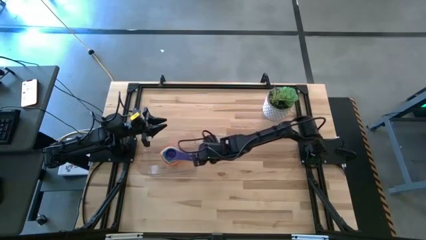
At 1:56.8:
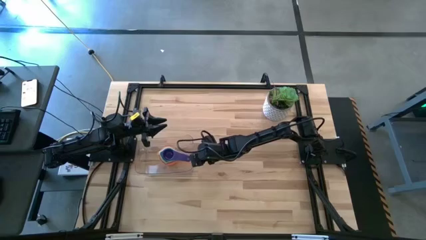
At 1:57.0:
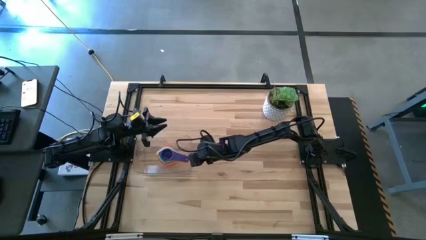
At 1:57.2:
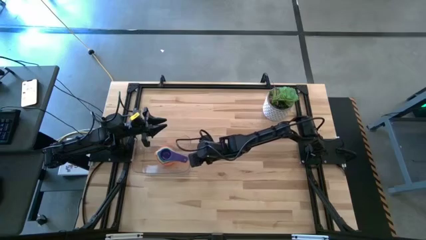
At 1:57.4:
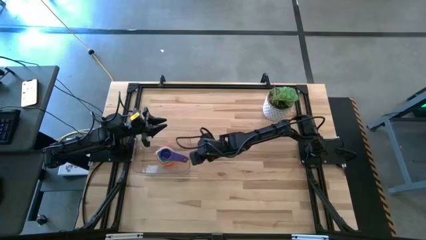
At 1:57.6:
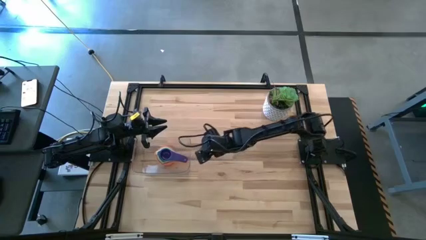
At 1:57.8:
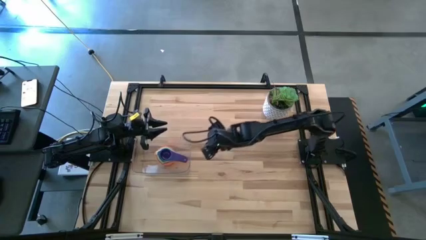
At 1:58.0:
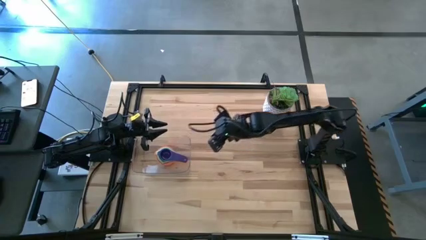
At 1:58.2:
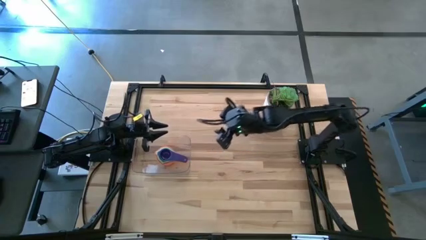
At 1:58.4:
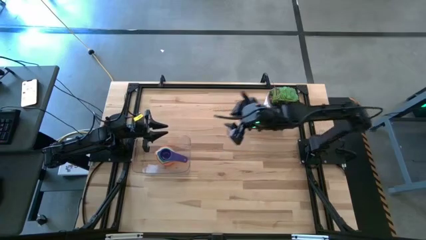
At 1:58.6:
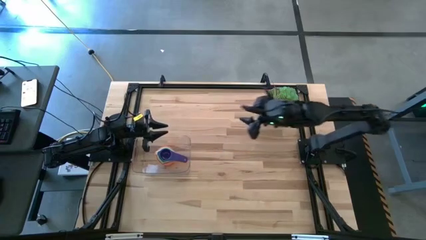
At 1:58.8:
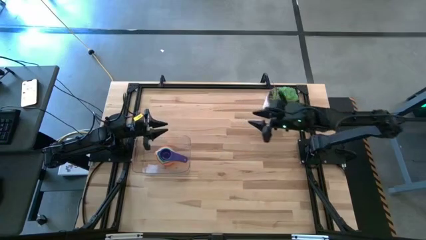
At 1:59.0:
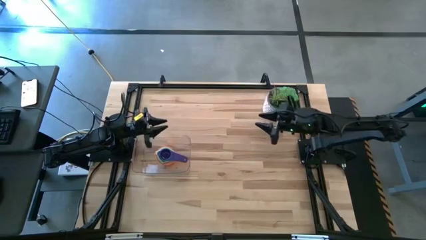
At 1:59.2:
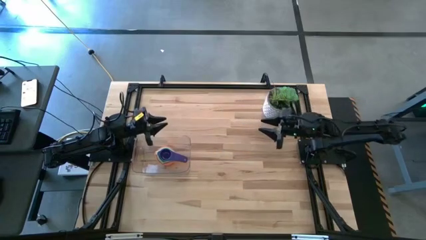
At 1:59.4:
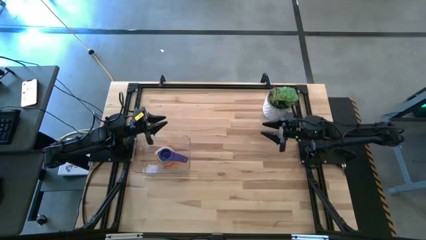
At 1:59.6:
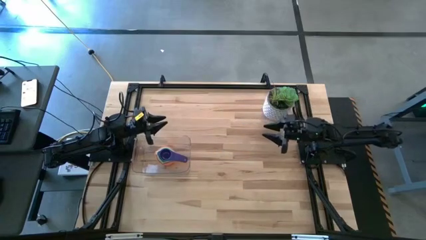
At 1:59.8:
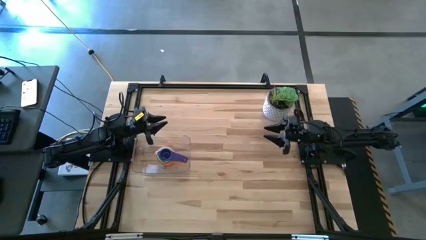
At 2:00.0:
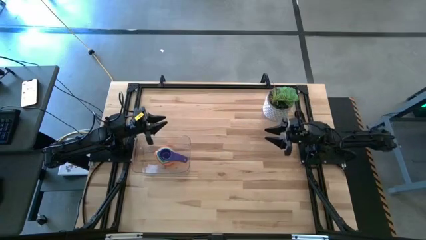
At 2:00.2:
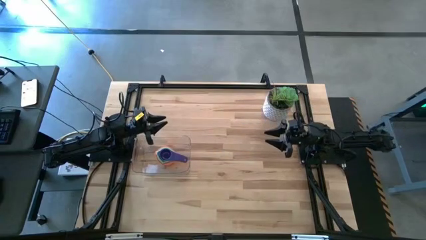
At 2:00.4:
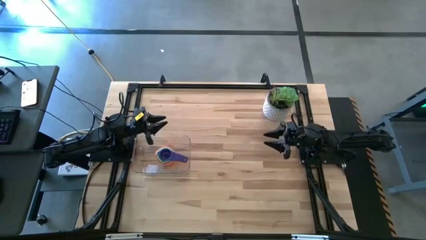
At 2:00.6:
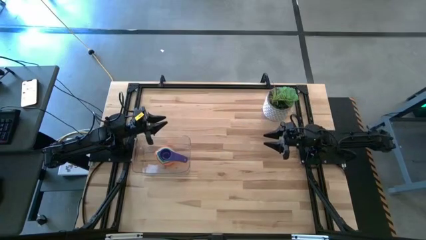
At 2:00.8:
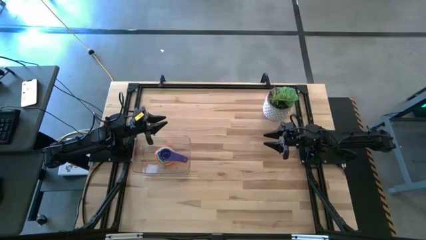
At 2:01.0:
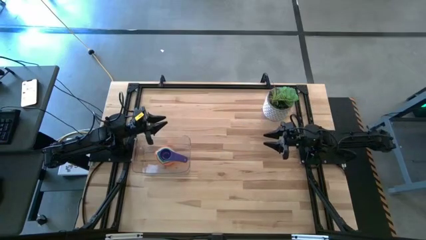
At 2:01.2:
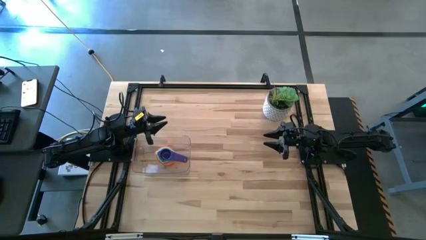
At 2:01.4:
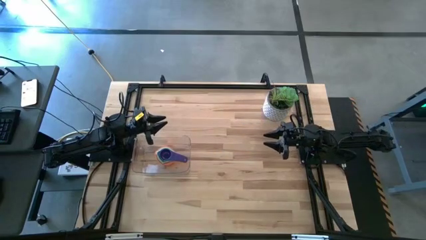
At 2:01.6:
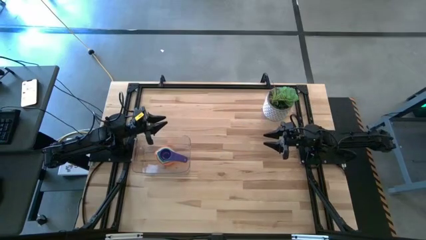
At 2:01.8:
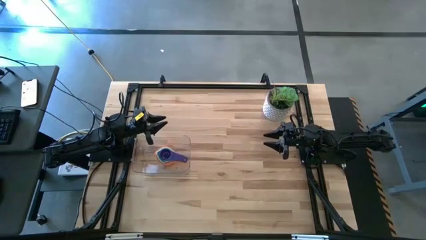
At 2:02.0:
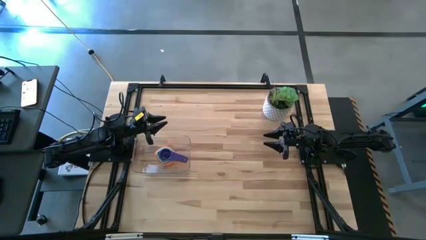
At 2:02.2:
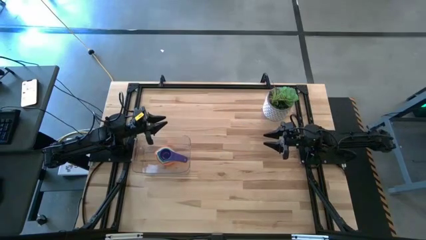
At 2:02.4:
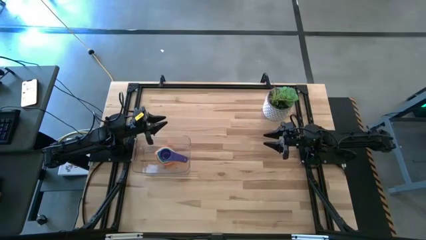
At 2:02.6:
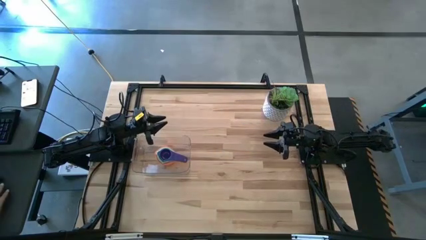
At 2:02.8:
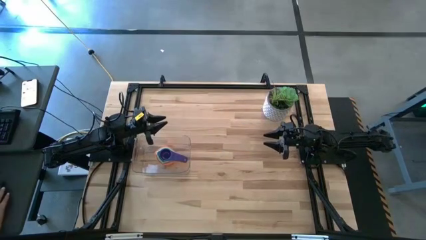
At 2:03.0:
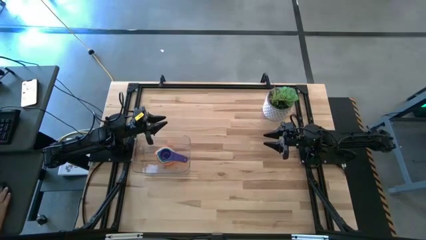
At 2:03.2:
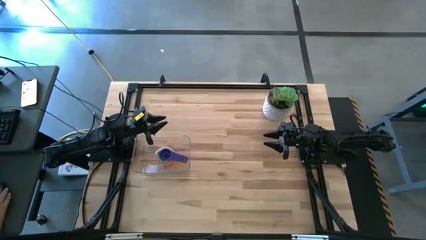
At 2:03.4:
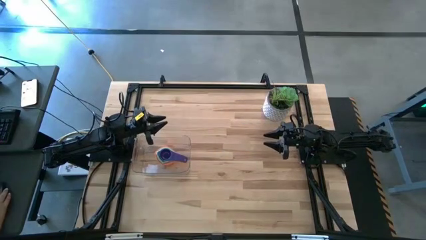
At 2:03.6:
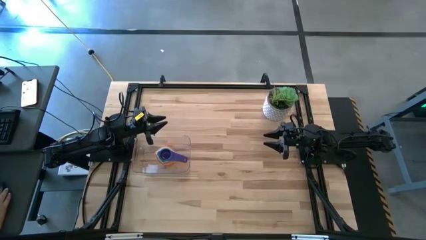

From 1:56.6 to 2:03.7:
Task: Nest measuring cups in basket
Return to Home Position

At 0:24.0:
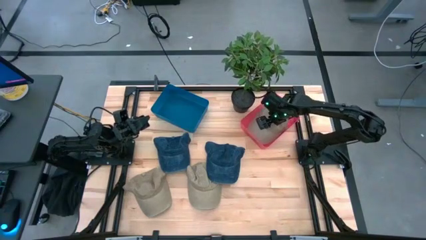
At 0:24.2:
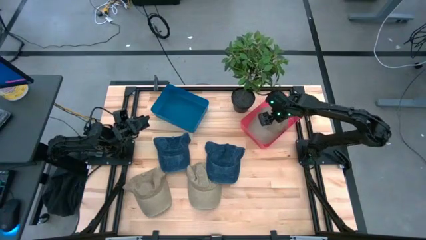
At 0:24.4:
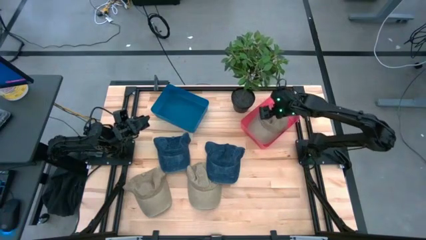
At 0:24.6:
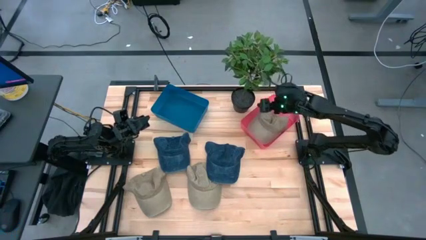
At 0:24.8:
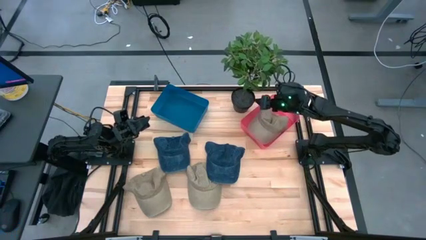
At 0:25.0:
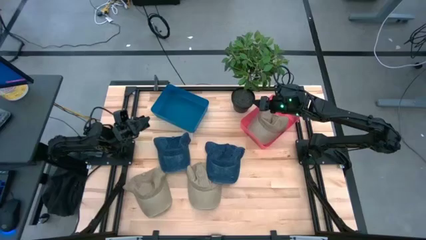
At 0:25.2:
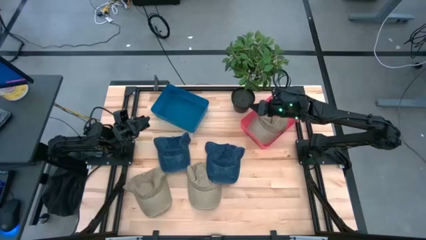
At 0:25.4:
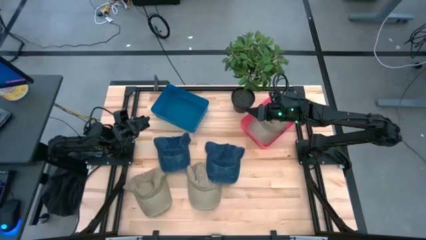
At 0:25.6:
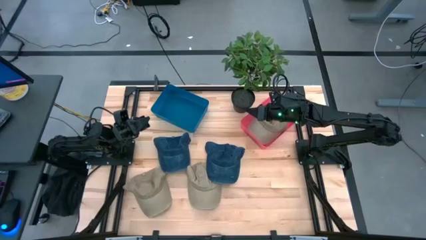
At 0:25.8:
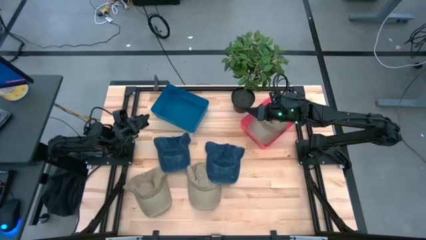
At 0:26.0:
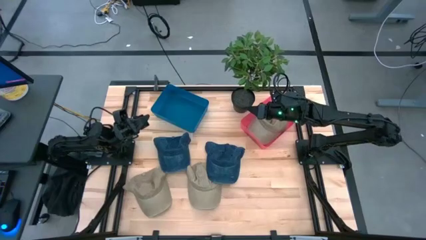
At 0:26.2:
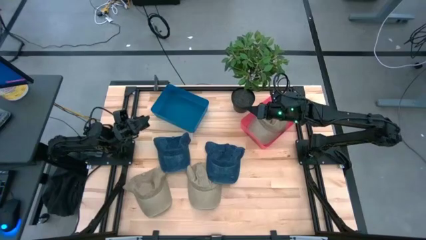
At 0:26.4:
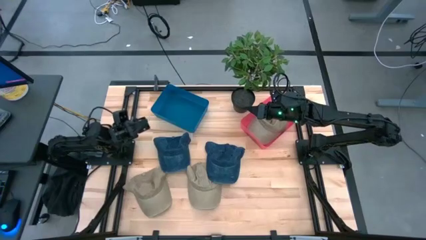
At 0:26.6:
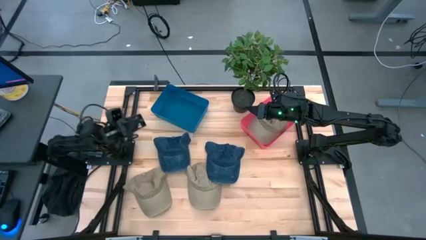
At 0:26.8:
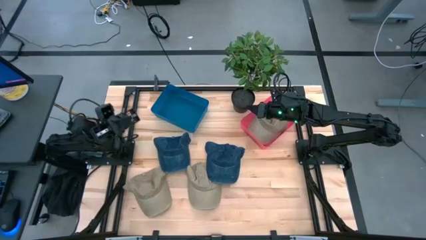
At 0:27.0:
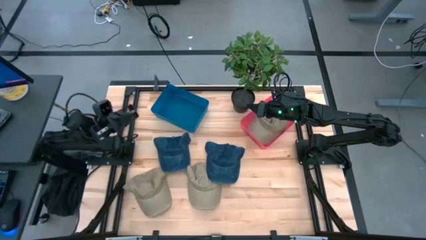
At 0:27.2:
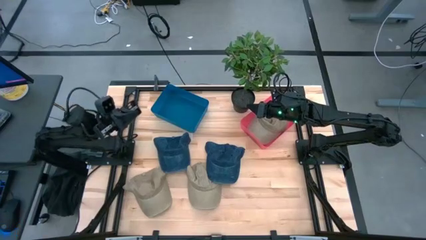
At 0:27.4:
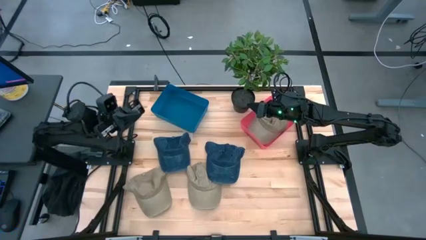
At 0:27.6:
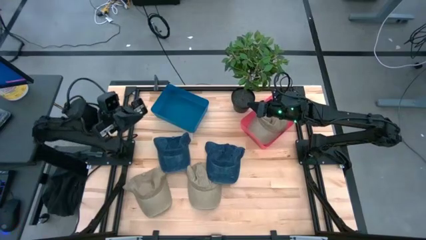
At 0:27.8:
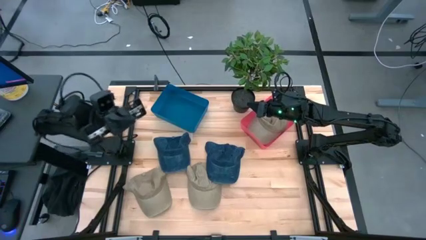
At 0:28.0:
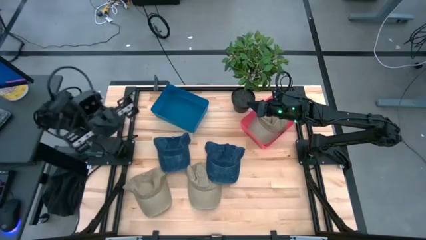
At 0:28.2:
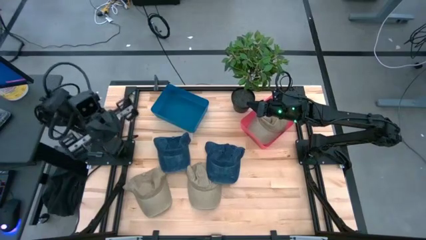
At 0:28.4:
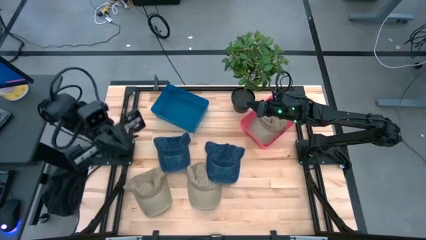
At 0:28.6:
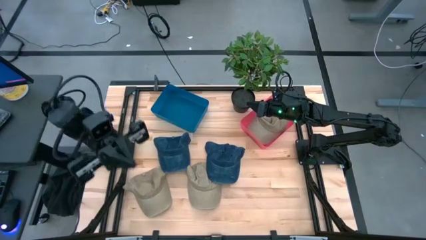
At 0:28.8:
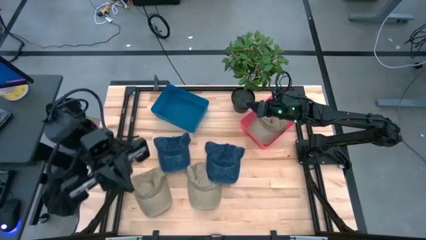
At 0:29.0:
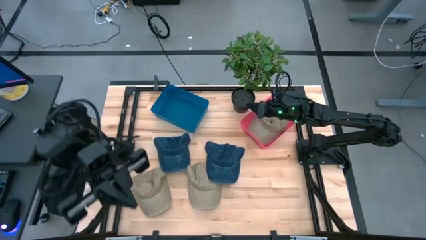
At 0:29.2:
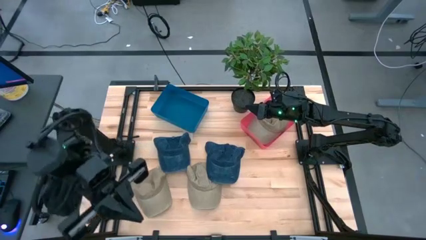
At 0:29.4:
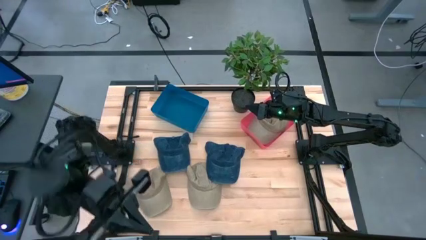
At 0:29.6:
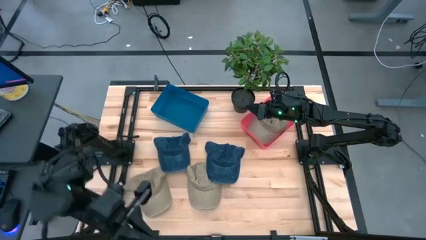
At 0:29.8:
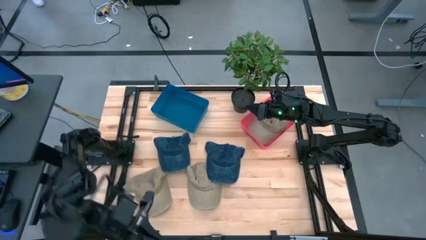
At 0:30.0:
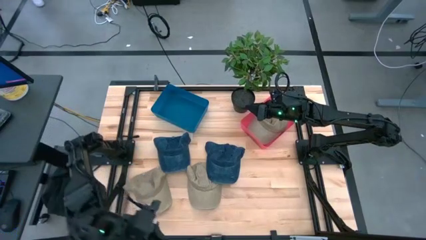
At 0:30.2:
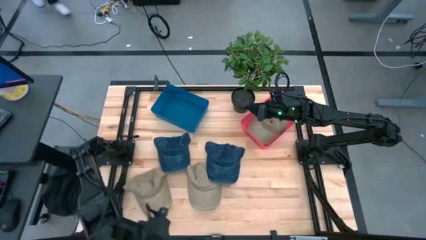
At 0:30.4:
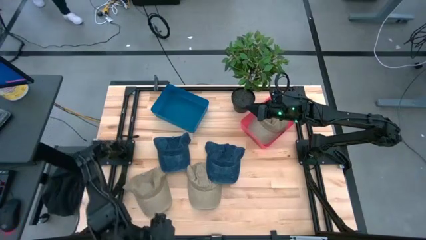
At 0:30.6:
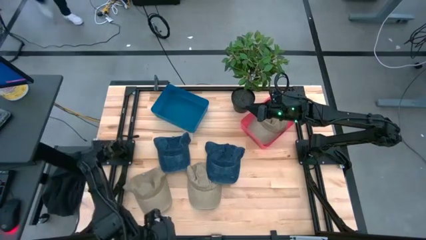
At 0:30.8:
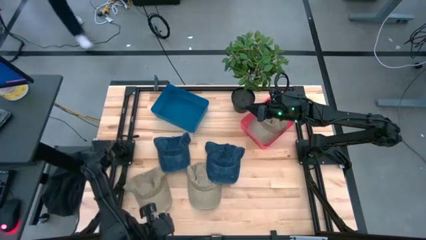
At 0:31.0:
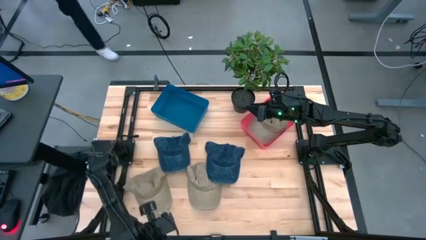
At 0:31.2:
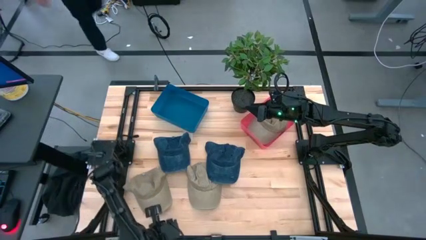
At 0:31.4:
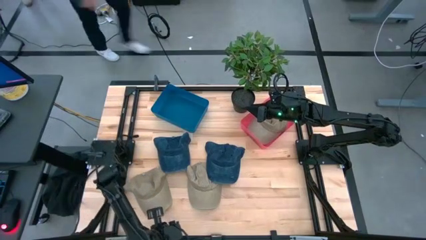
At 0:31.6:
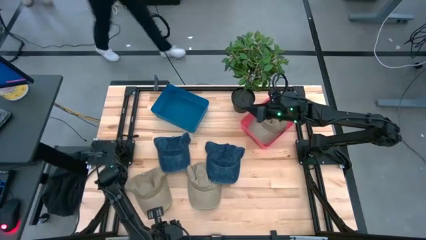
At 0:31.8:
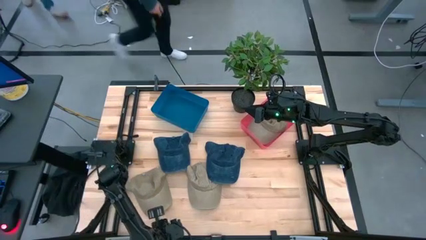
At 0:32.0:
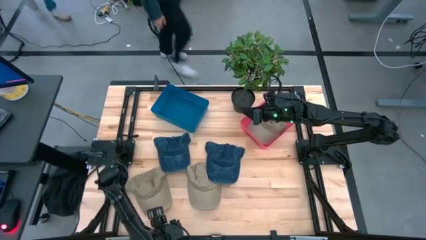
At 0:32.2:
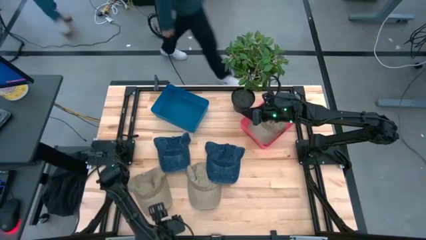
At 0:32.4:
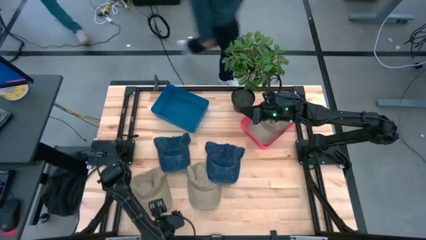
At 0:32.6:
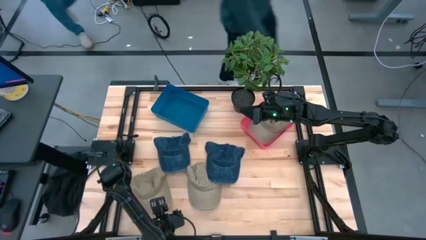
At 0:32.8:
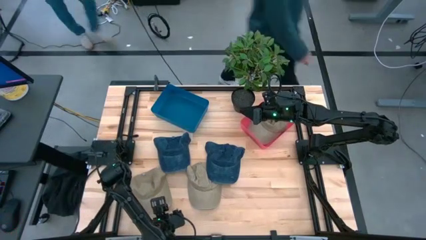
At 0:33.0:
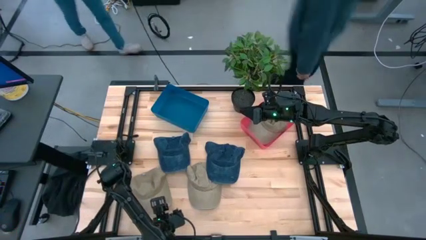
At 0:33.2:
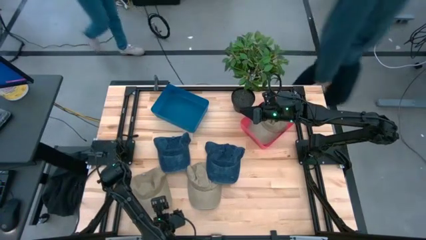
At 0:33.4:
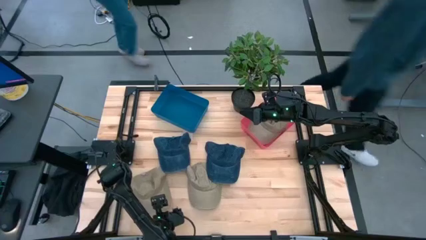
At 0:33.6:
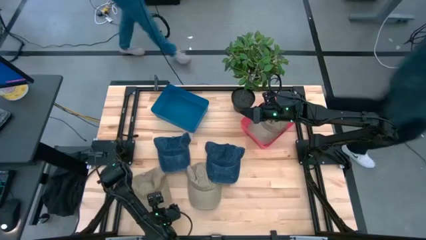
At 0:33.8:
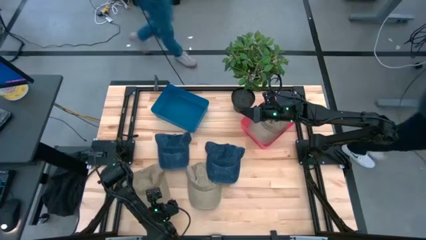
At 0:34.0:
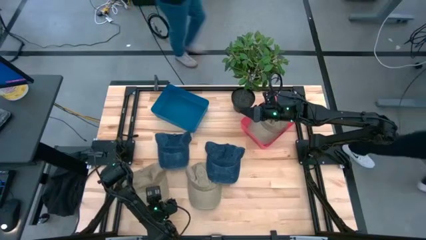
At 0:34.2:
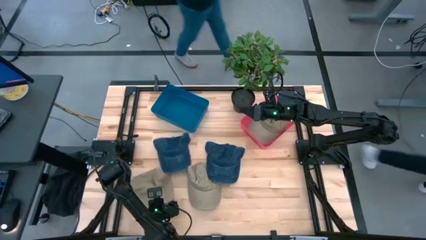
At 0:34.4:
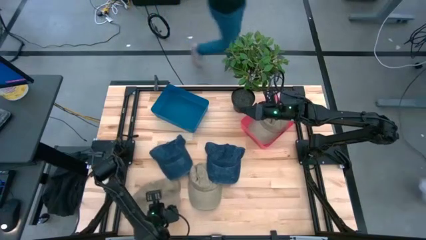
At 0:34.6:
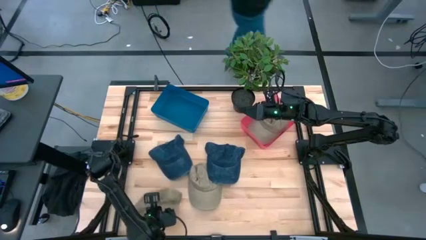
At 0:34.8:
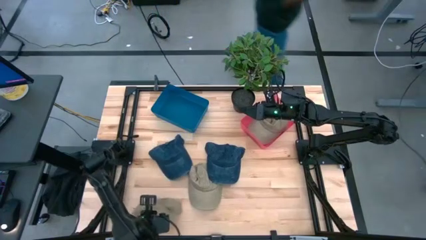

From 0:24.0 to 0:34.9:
Task: Pick & Place hat
Put the left brown cap into the red bin
